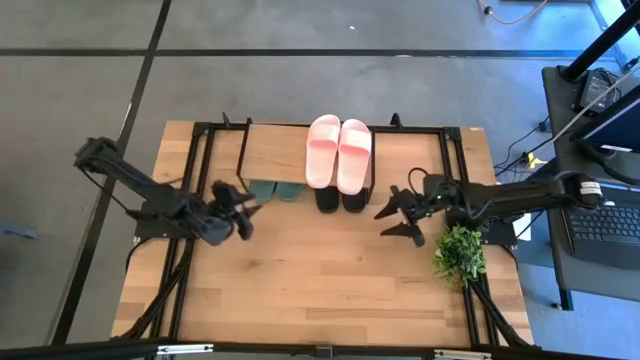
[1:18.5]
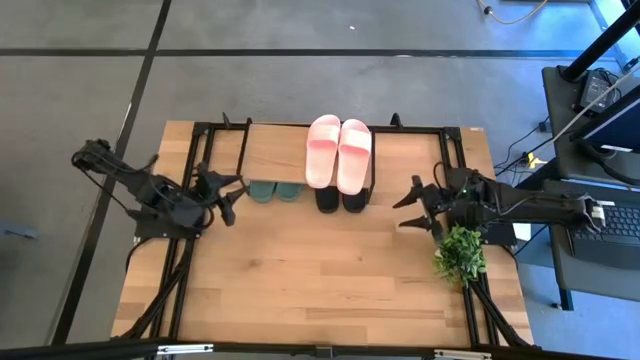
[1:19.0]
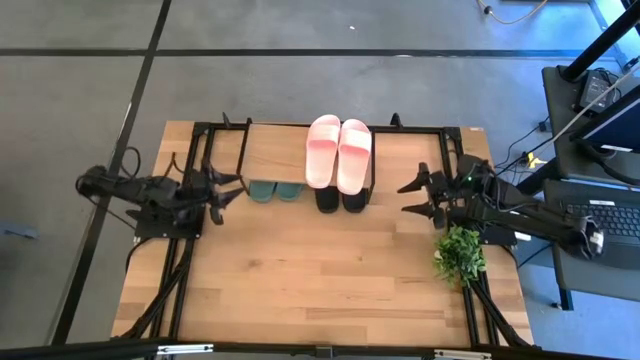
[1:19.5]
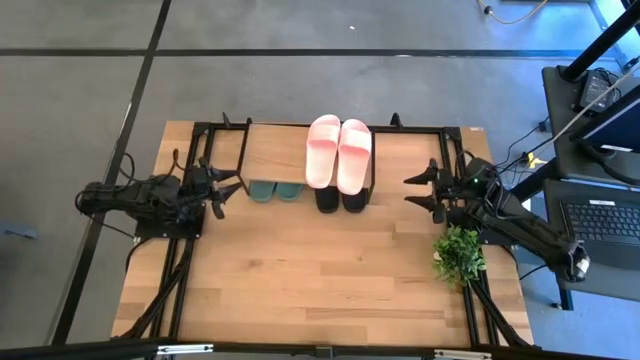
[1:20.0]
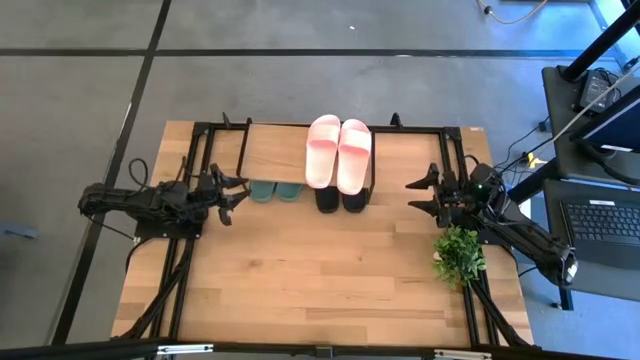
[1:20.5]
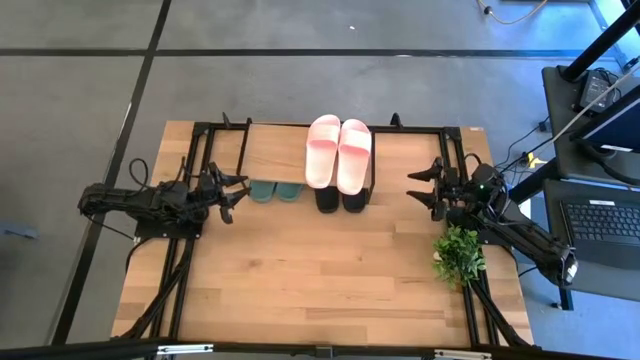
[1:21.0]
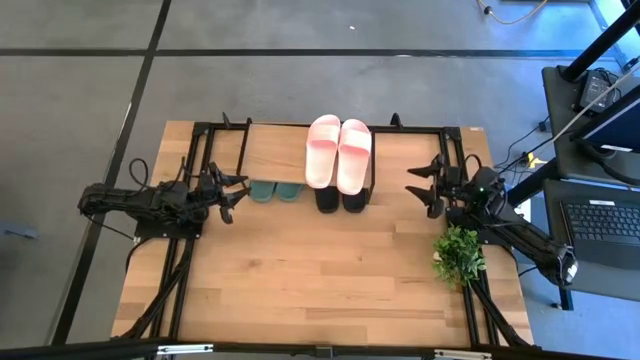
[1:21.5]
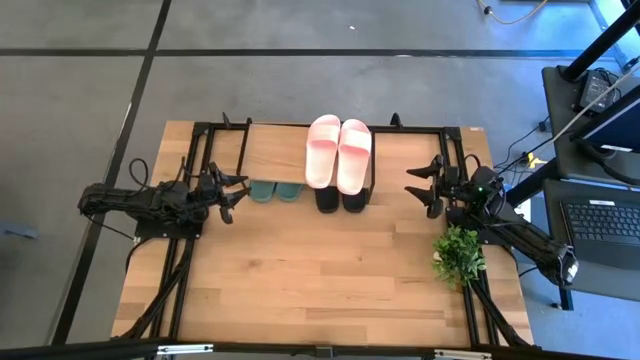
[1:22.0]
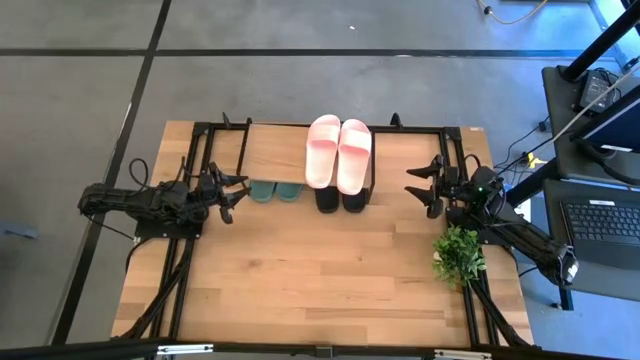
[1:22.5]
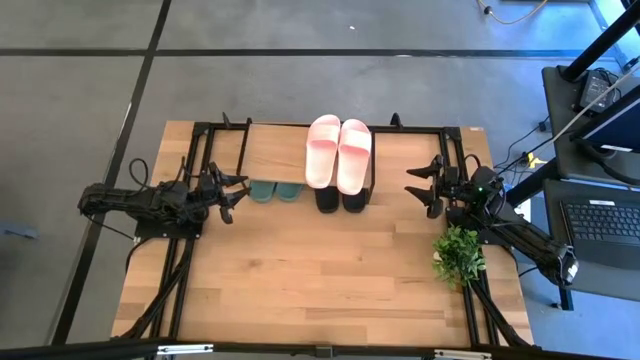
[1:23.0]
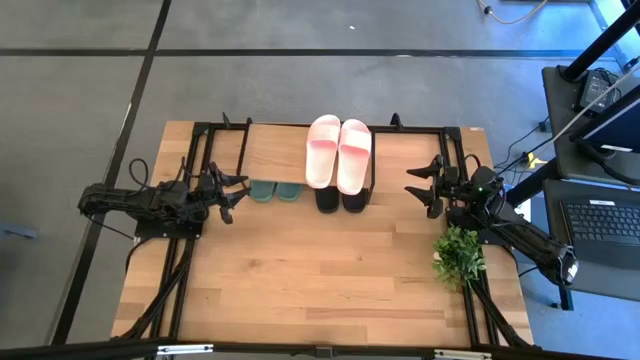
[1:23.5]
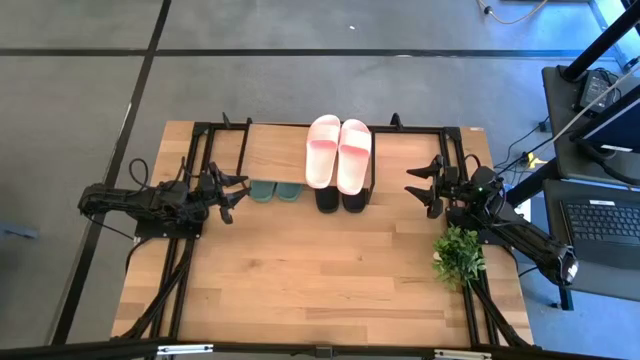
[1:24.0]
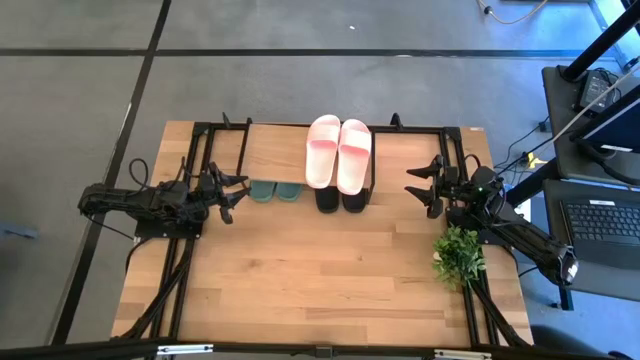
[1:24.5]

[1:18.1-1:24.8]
Task: Pick and place slides into the shelf
Return to Home Position

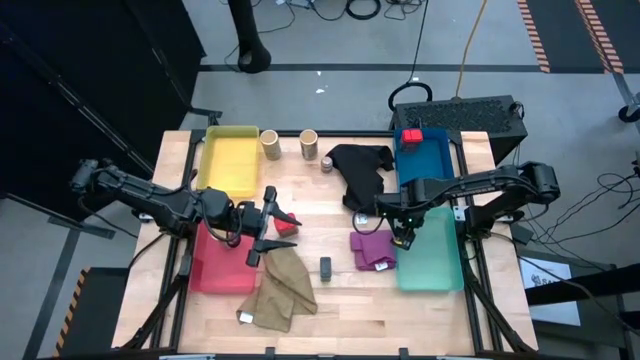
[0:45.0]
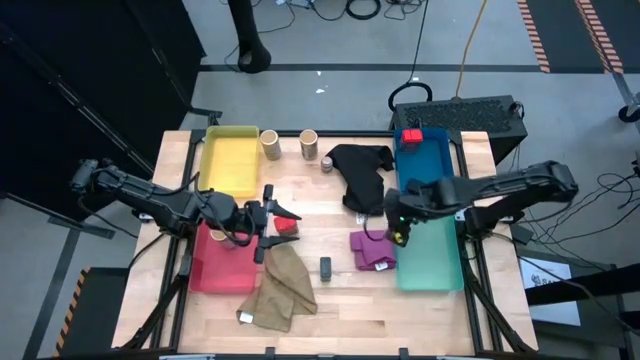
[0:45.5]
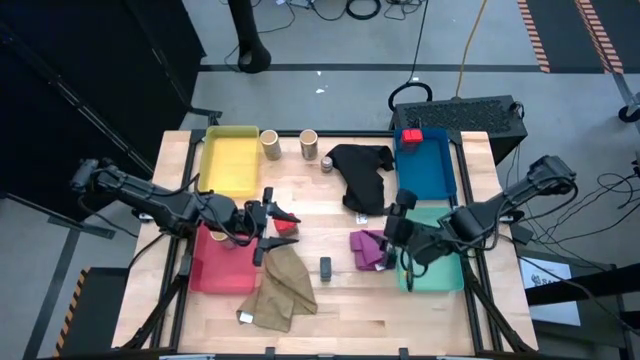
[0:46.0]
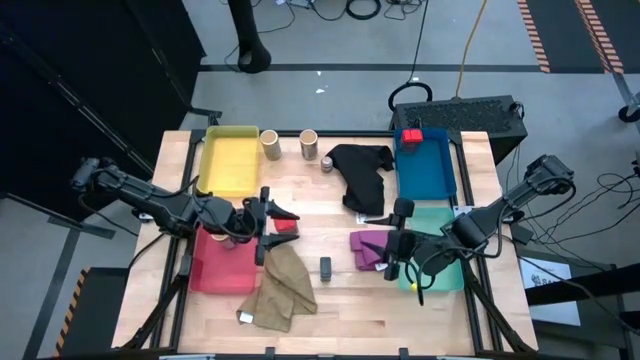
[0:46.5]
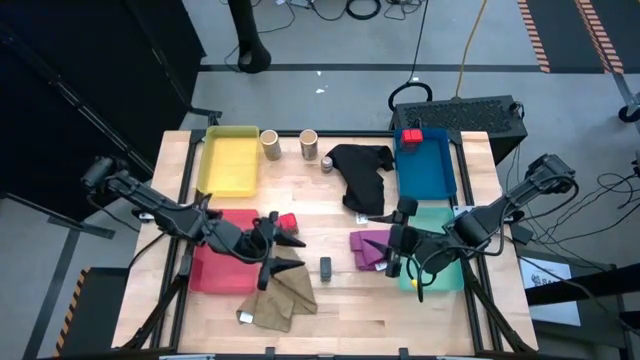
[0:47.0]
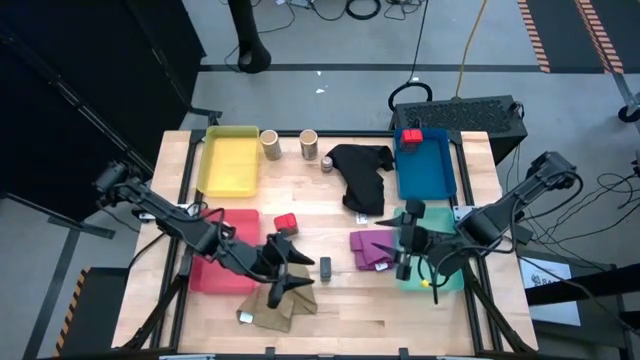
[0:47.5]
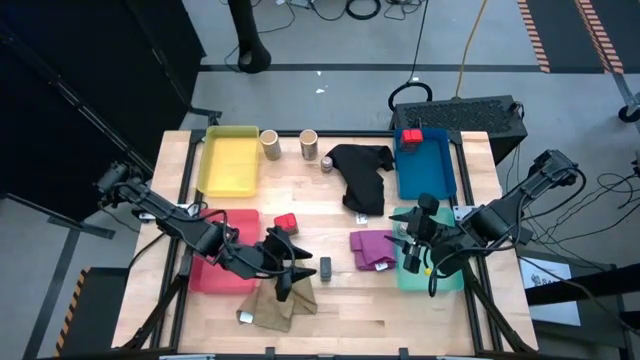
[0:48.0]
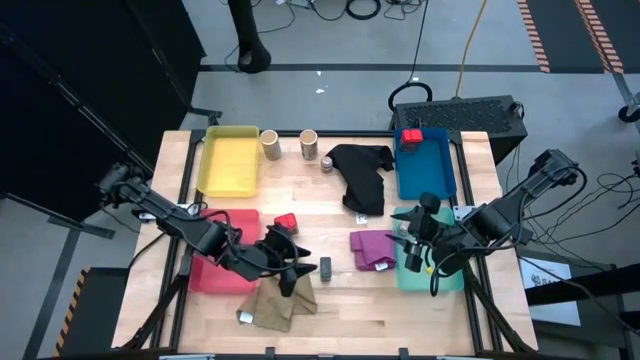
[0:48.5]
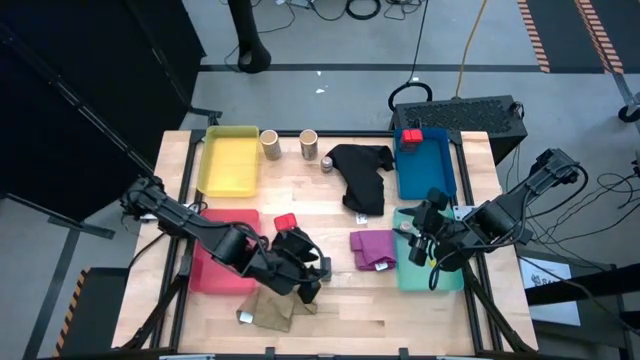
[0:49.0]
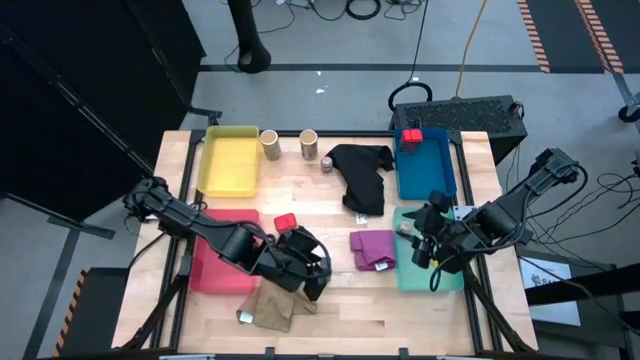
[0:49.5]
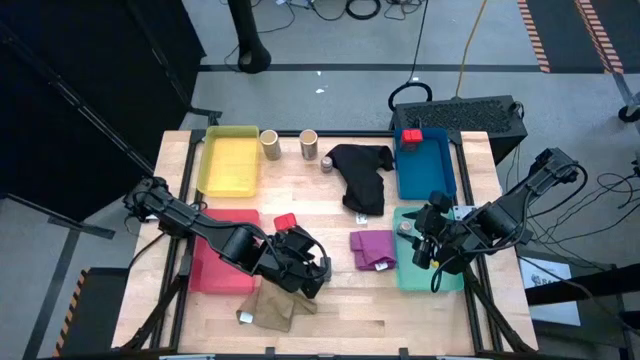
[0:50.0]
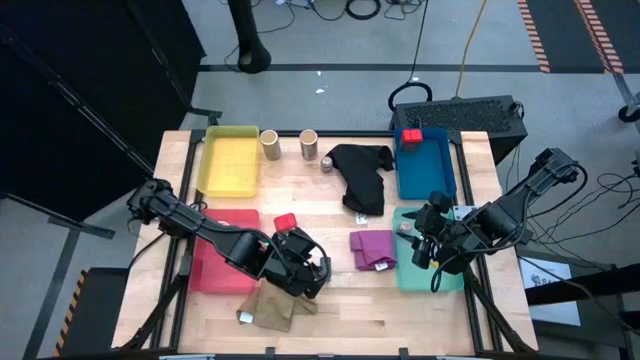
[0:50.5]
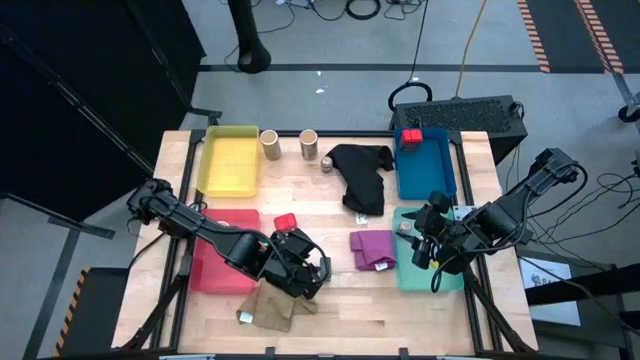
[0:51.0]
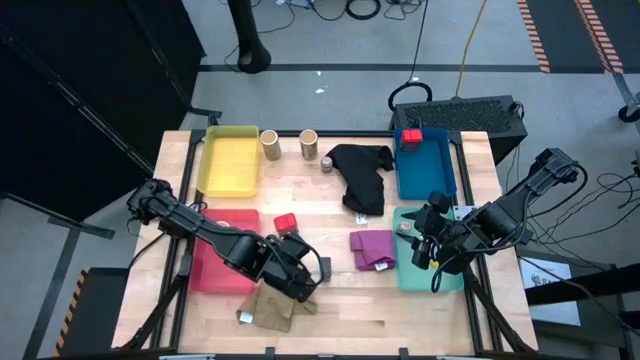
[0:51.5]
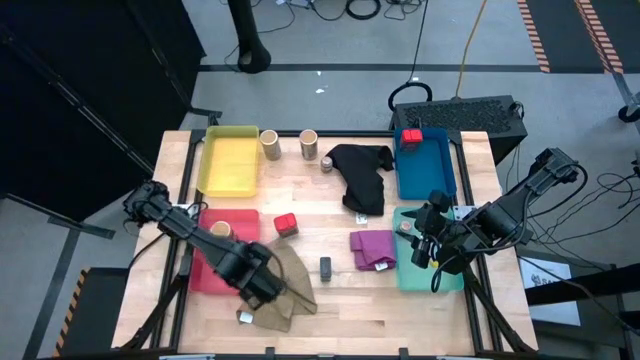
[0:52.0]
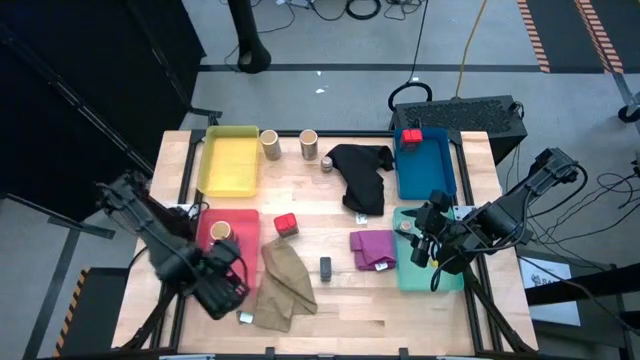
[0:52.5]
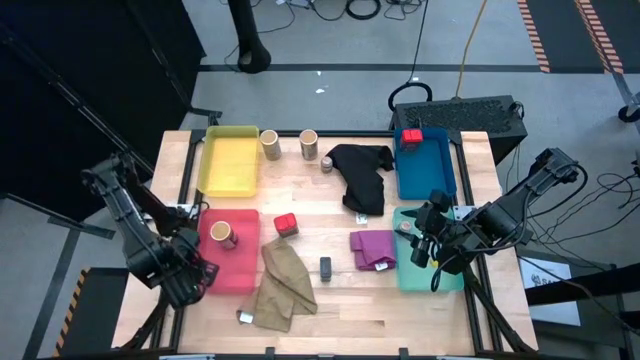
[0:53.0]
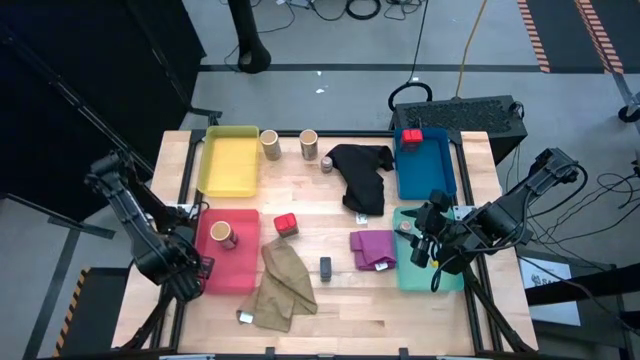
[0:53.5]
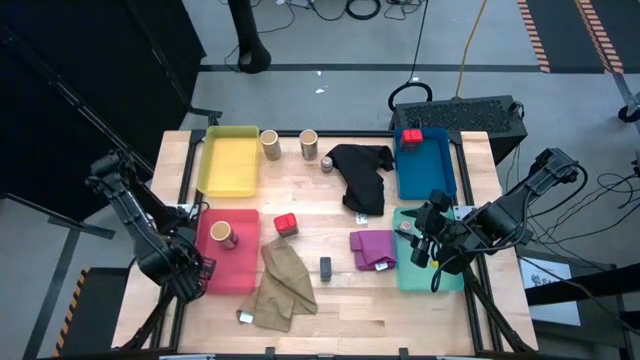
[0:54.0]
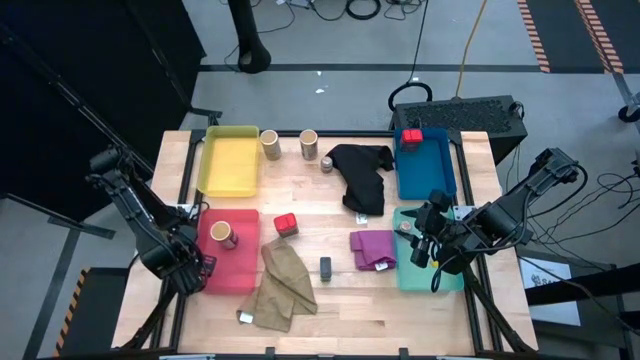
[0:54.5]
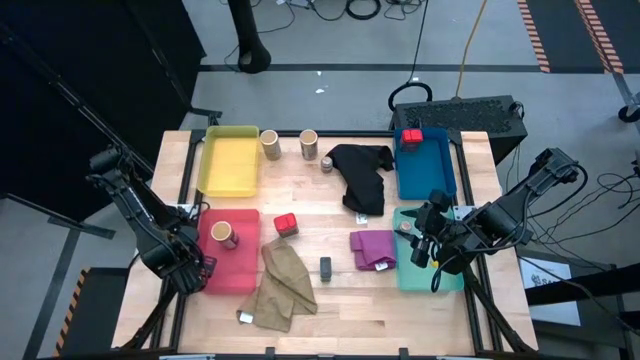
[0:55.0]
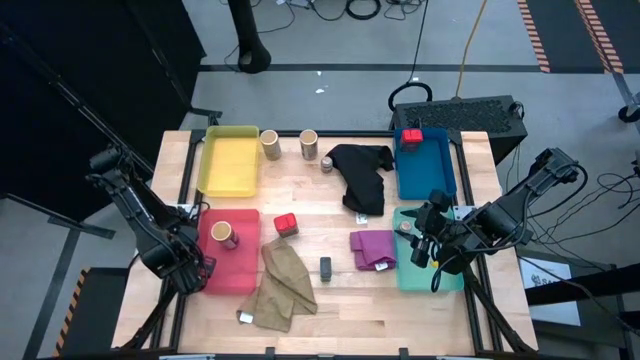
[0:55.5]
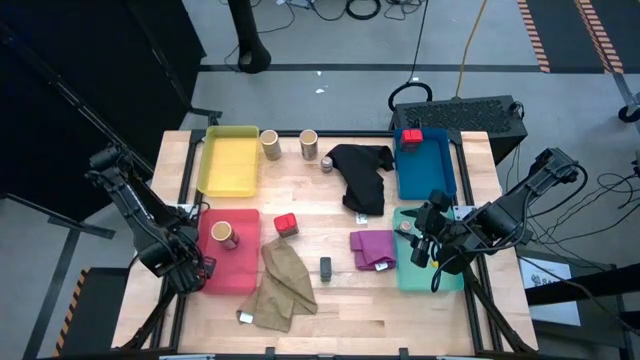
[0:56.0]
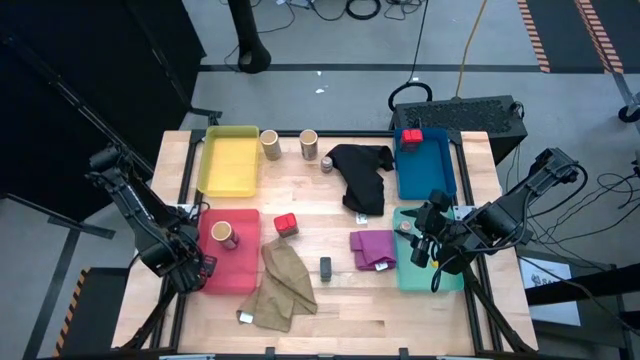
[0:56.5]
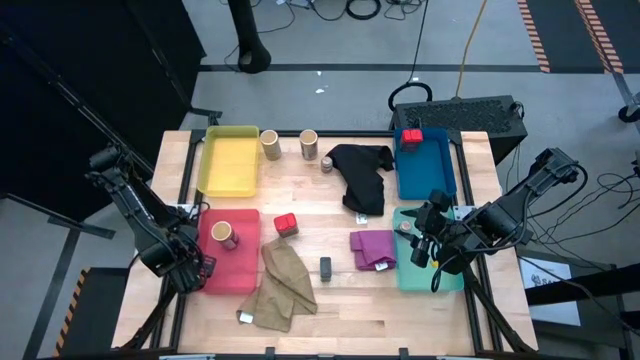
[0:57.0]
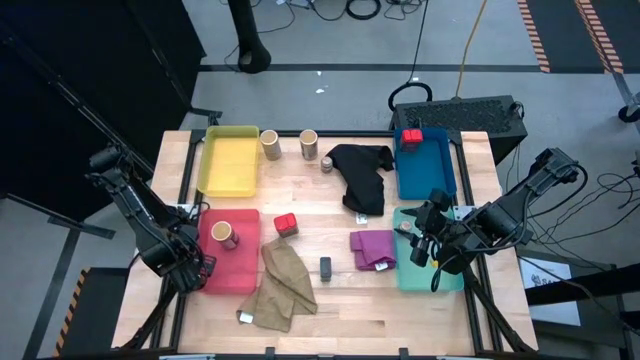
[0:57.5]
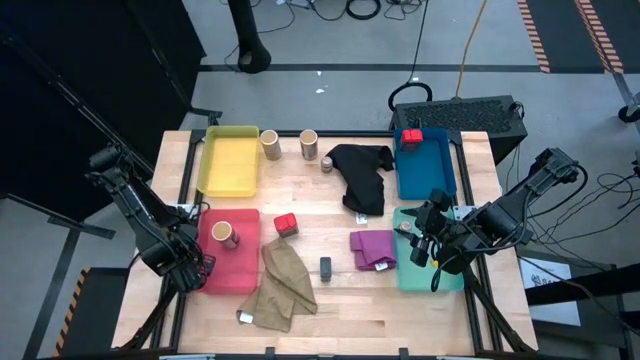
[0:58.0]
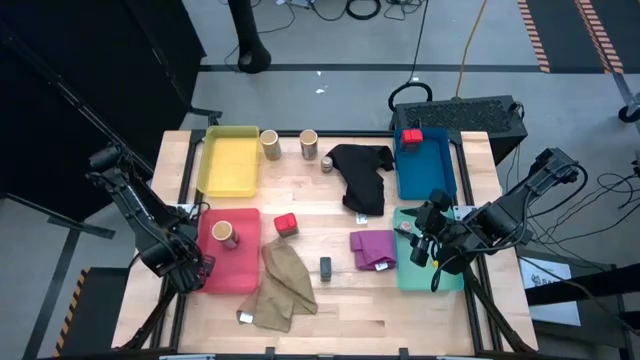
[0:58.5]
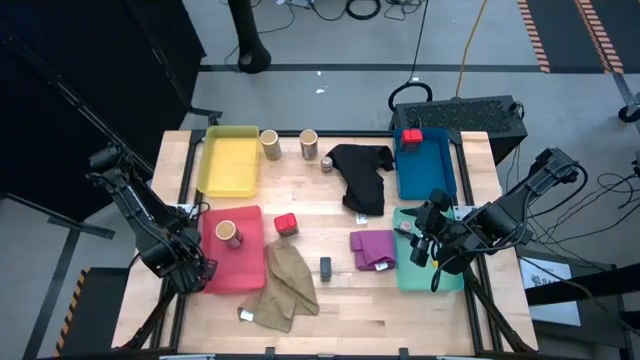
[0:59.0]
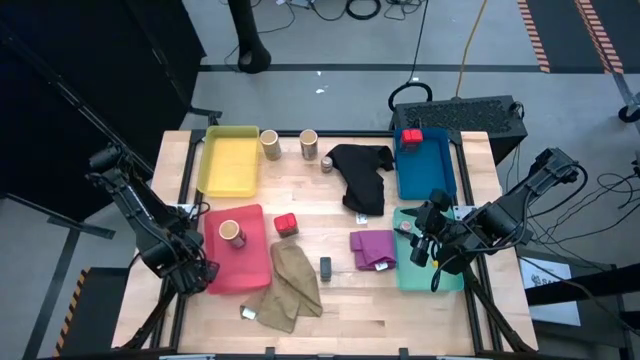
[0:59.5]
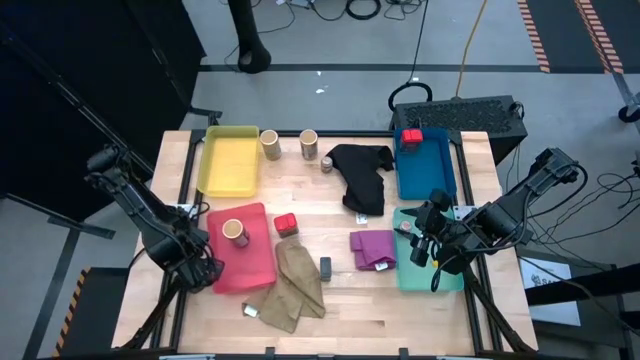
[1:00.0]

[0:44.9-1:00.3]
Task: Sort spices by type
Put the left black seasoning can into the yellow bin
